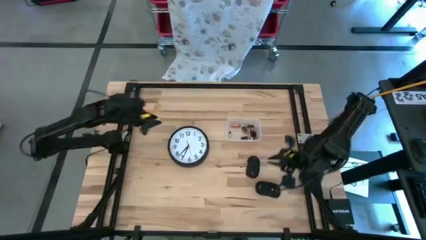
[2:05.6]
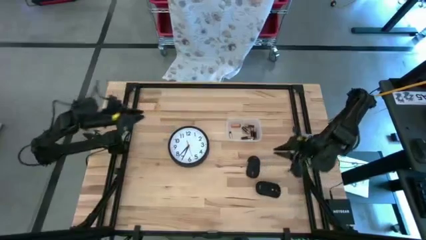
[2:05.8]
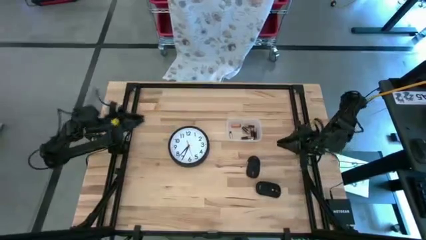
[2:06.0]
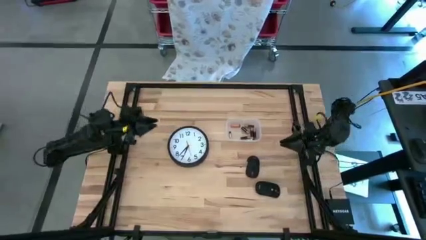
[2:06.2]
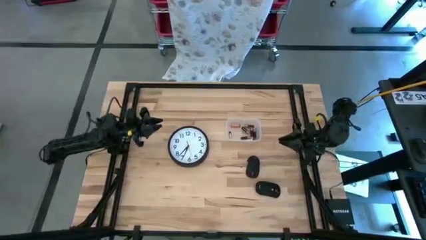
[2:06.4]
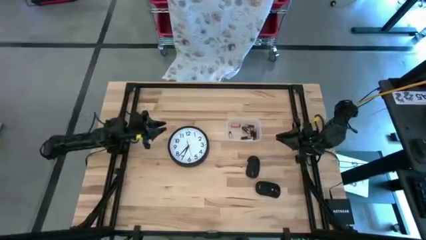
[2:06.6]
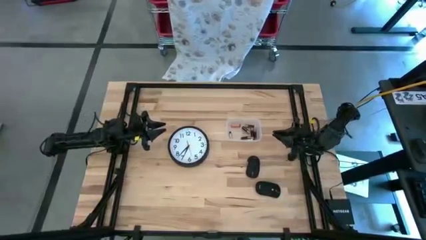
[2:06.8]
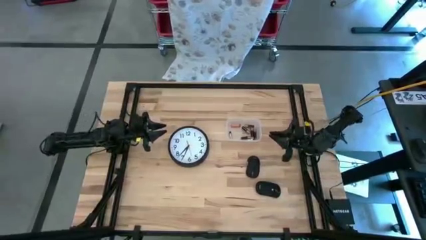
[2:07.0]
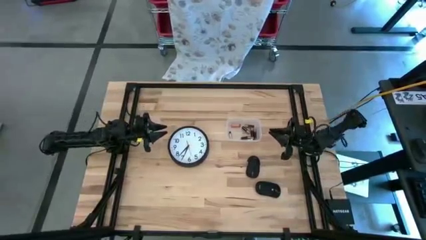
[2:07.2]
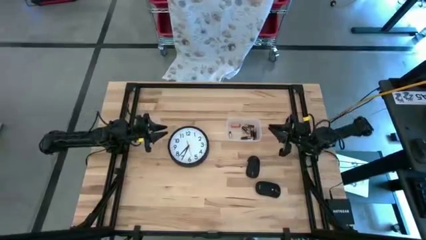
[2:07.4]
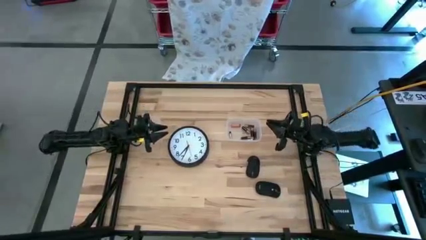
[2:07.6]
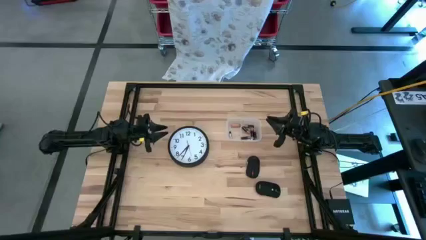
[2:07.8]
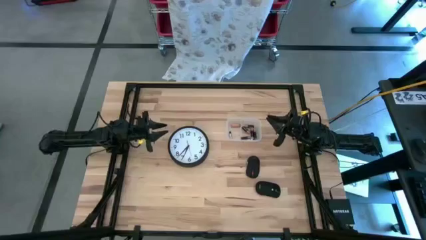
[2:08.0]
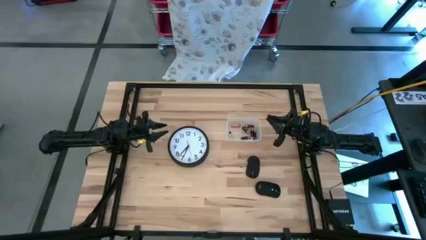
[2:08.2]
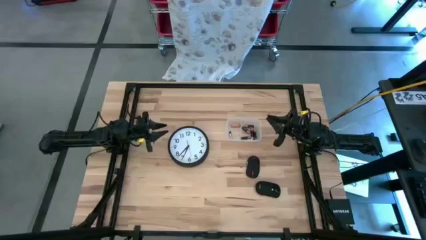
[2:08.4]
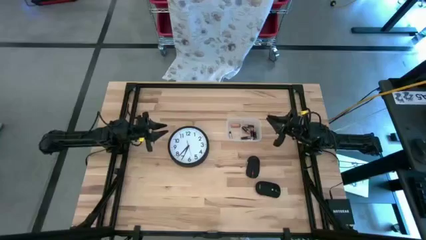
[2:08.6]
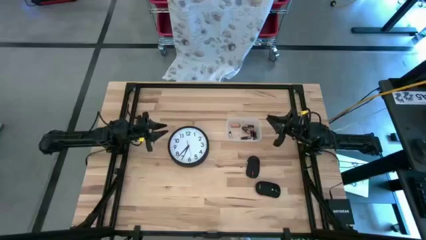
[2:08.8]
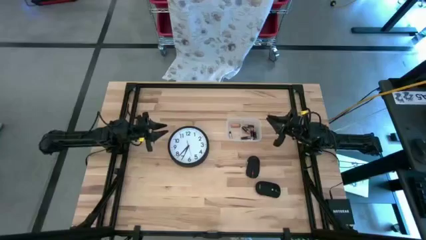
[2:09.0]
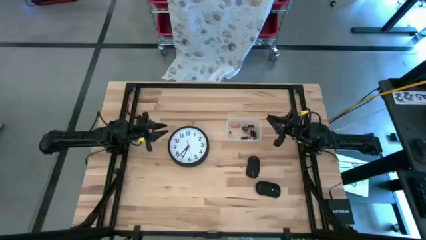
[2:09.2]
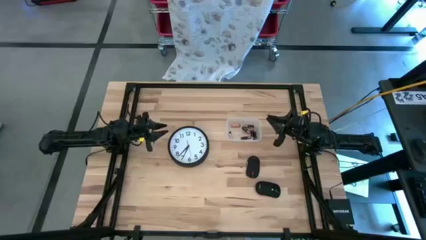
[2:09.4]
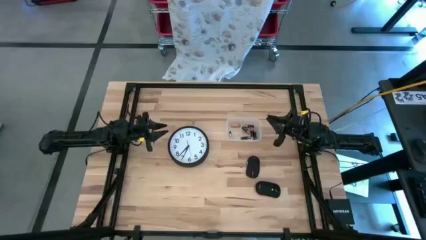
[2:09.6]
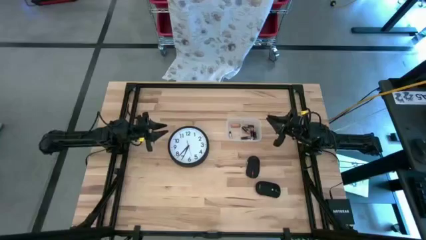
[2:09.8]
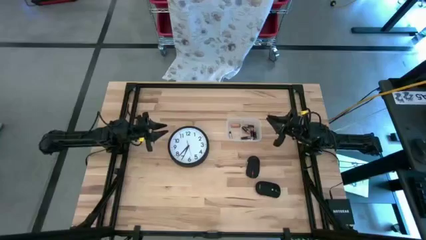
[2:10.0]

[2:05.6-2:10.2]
Task: Insert battery
Return to Home Position

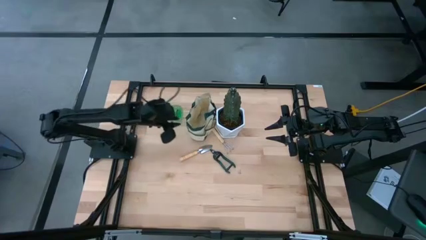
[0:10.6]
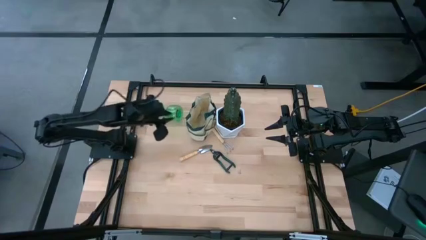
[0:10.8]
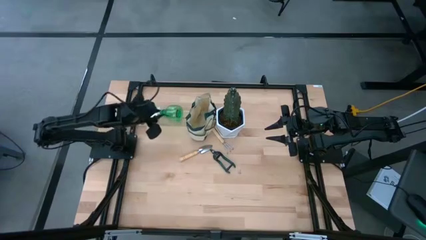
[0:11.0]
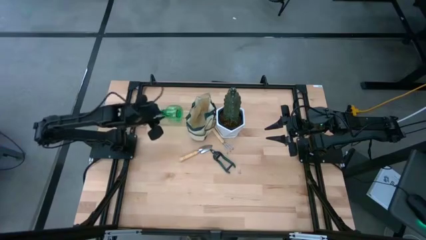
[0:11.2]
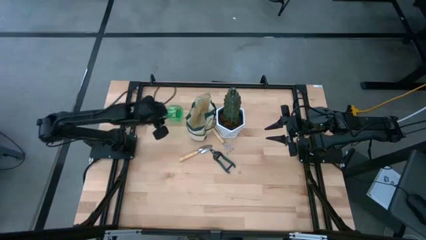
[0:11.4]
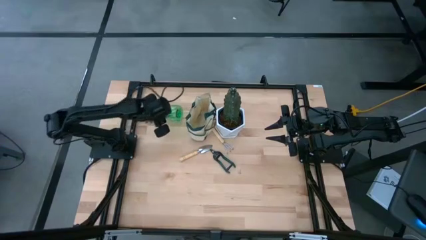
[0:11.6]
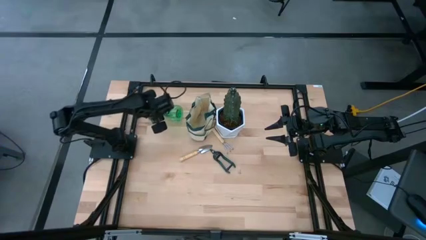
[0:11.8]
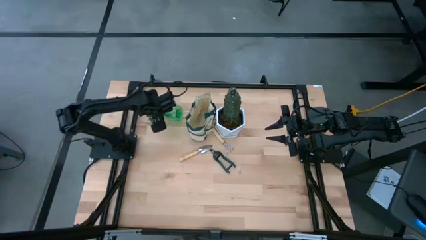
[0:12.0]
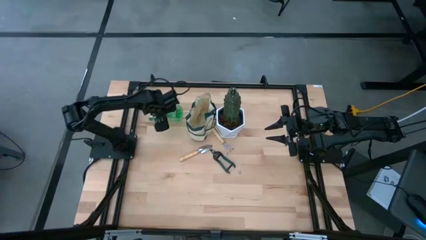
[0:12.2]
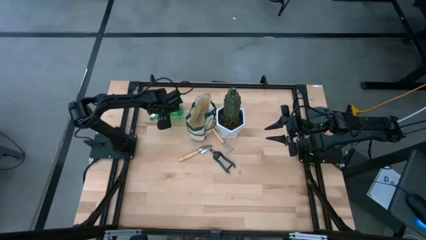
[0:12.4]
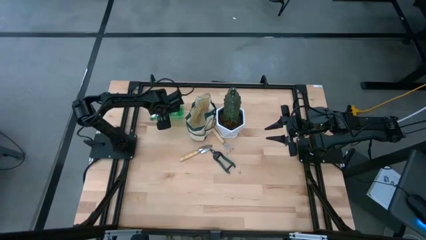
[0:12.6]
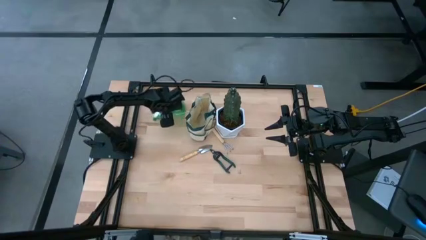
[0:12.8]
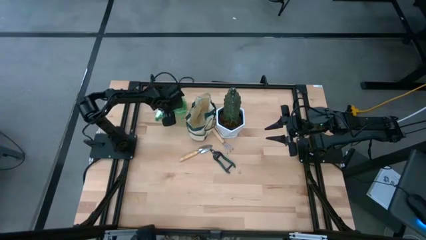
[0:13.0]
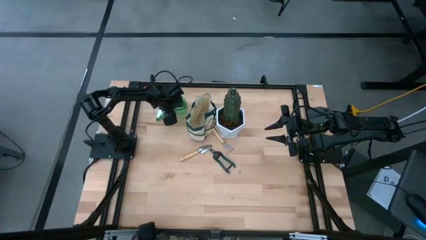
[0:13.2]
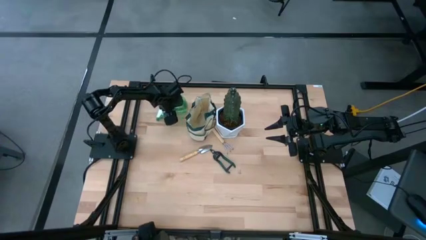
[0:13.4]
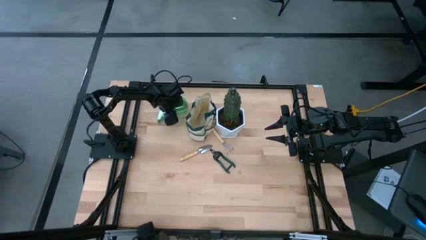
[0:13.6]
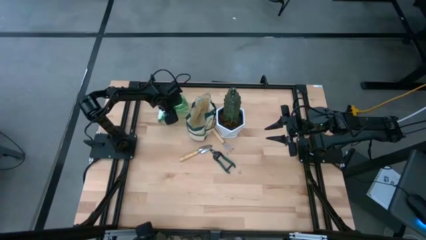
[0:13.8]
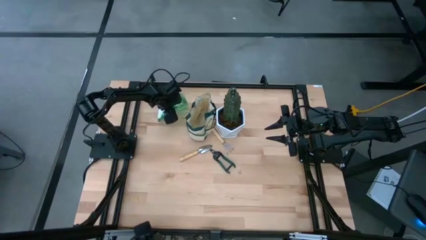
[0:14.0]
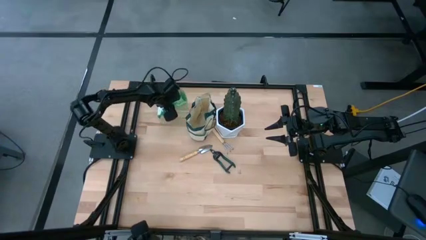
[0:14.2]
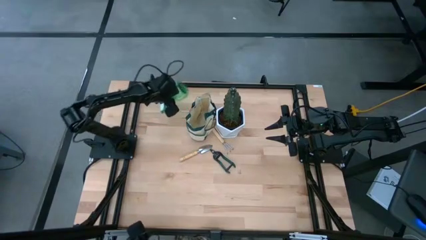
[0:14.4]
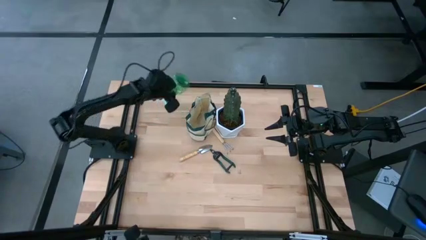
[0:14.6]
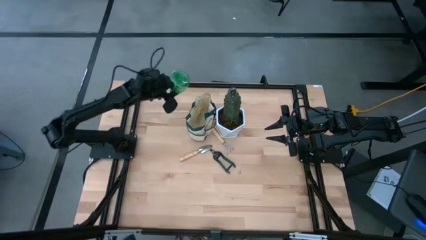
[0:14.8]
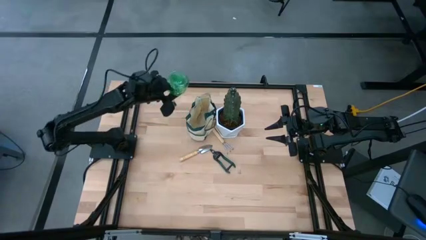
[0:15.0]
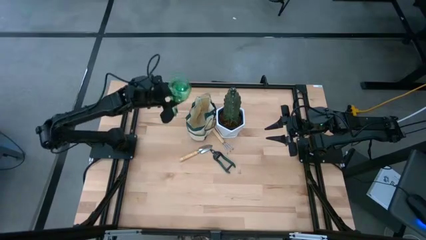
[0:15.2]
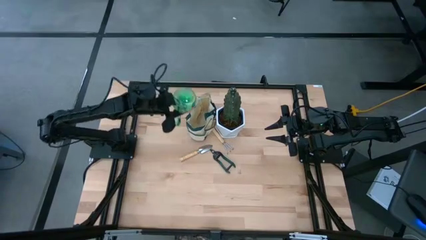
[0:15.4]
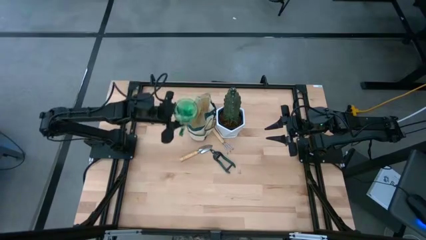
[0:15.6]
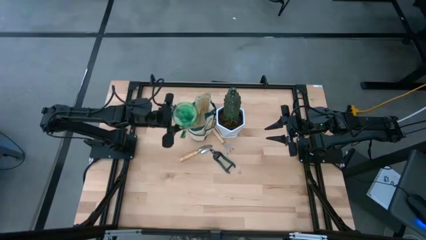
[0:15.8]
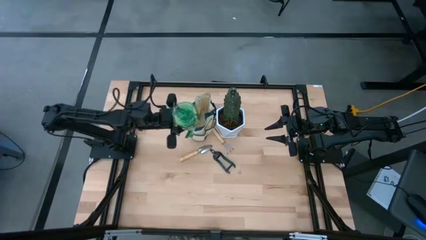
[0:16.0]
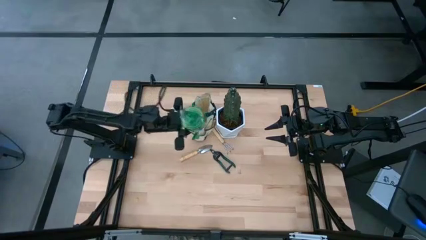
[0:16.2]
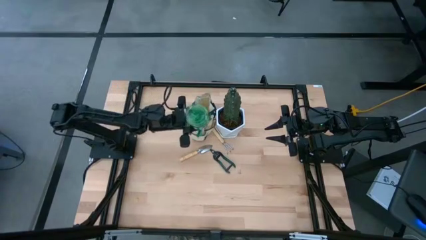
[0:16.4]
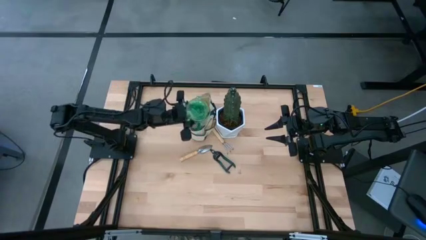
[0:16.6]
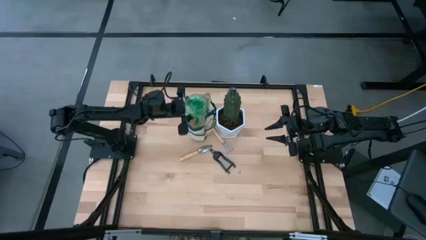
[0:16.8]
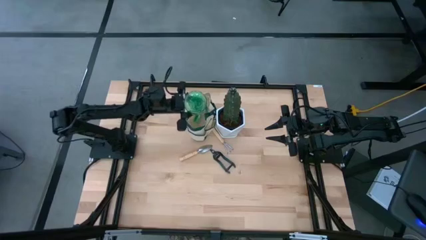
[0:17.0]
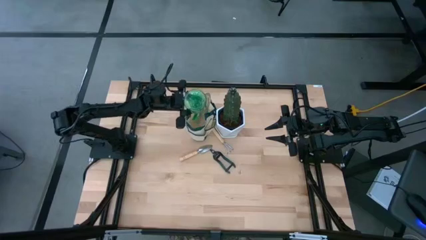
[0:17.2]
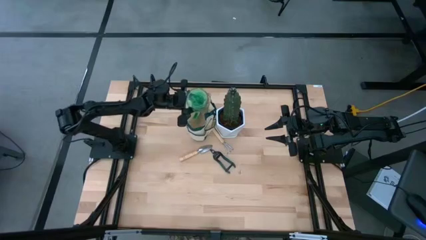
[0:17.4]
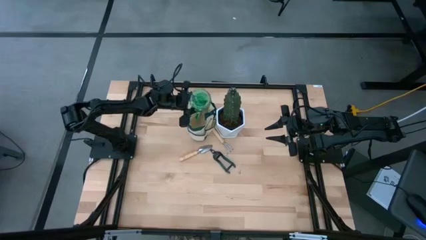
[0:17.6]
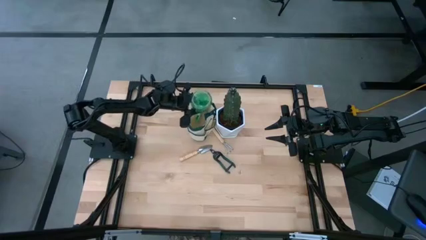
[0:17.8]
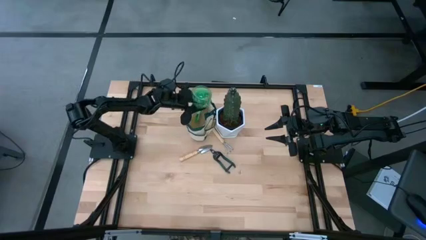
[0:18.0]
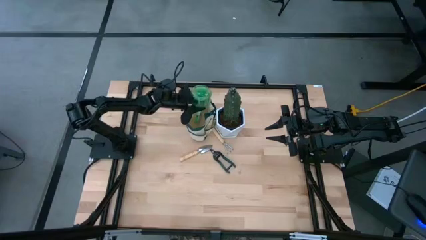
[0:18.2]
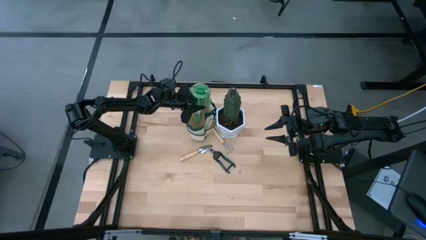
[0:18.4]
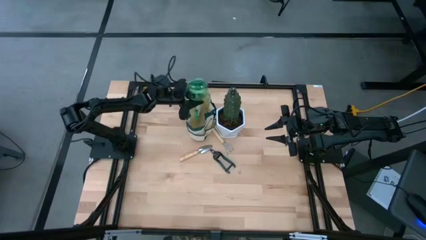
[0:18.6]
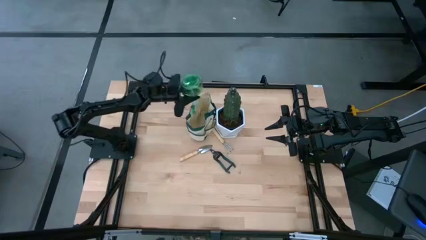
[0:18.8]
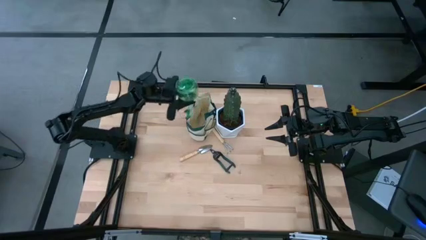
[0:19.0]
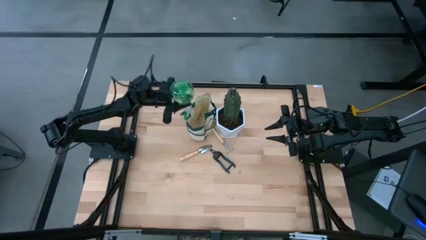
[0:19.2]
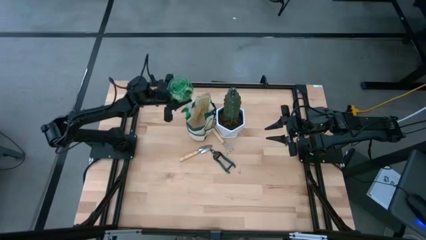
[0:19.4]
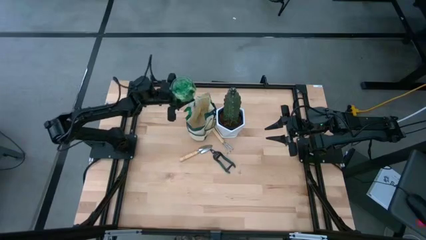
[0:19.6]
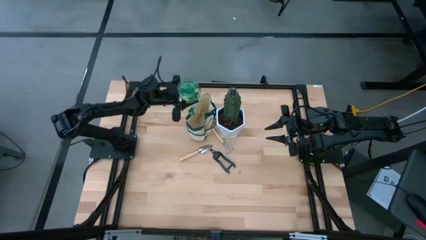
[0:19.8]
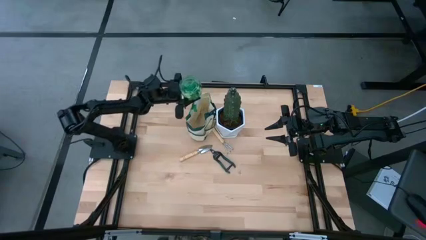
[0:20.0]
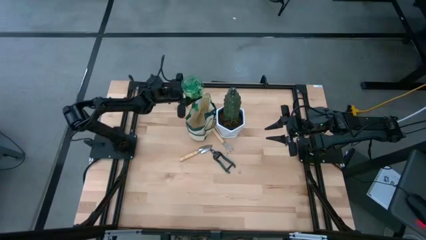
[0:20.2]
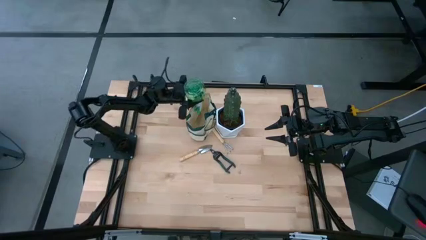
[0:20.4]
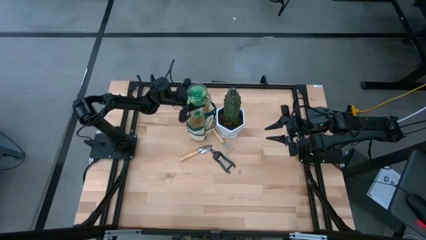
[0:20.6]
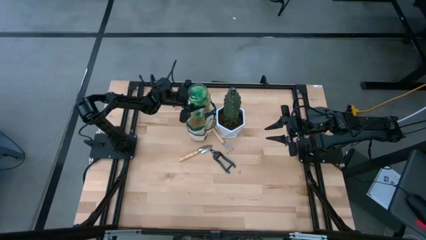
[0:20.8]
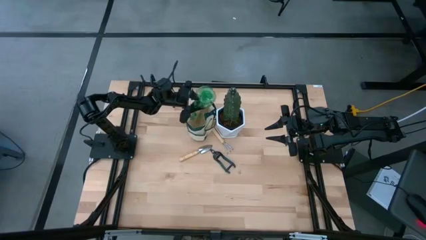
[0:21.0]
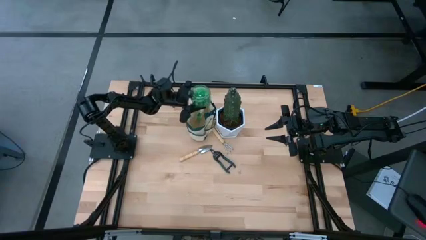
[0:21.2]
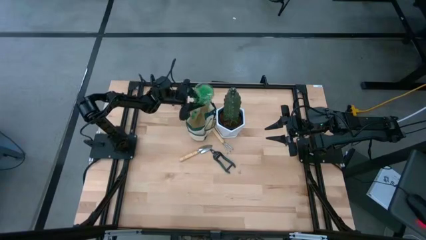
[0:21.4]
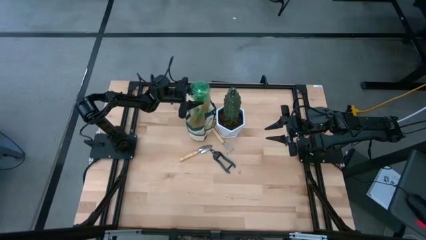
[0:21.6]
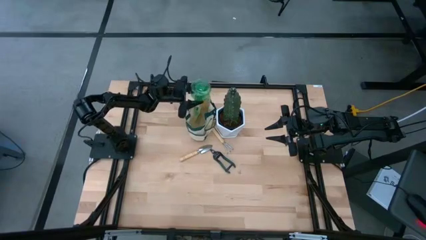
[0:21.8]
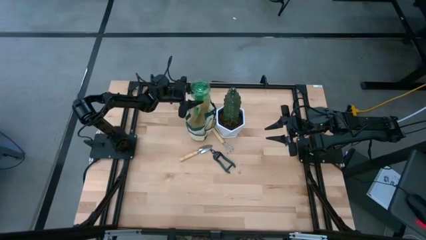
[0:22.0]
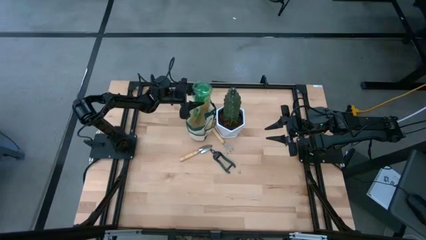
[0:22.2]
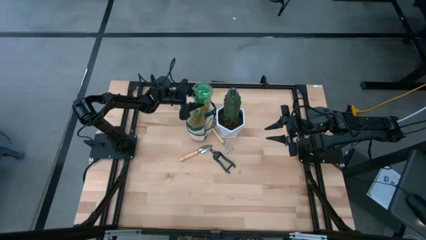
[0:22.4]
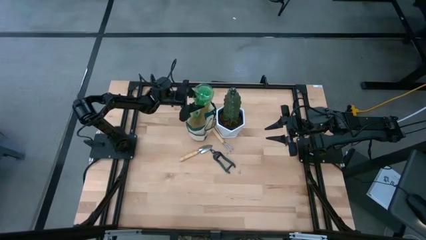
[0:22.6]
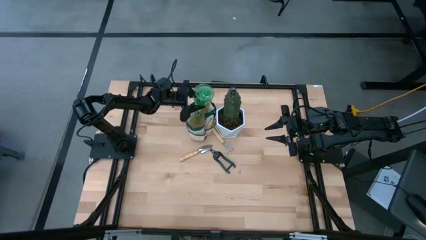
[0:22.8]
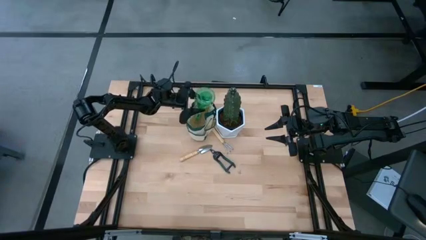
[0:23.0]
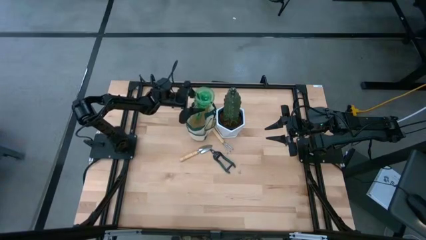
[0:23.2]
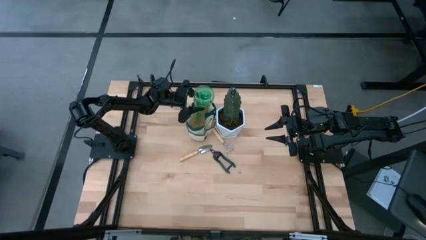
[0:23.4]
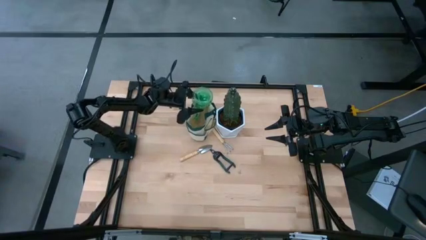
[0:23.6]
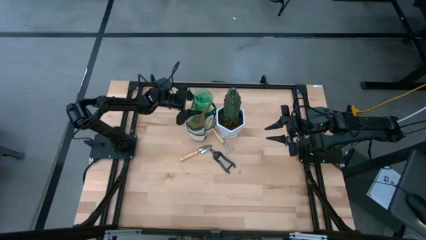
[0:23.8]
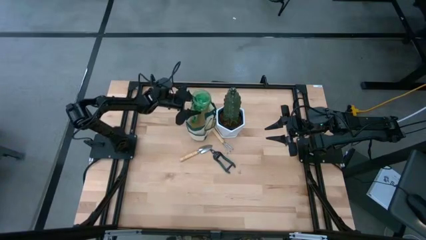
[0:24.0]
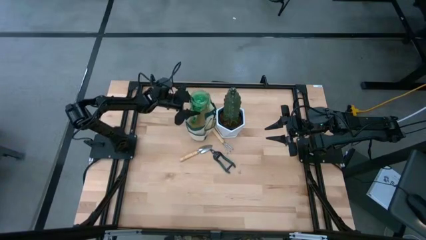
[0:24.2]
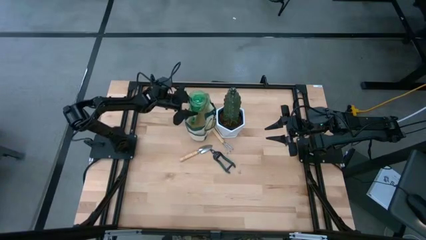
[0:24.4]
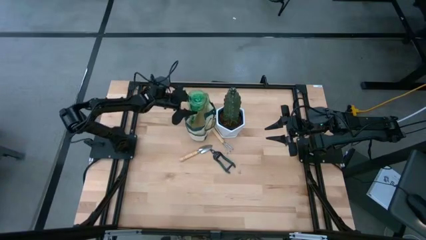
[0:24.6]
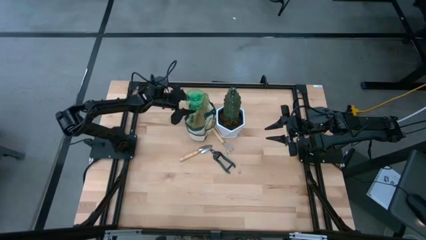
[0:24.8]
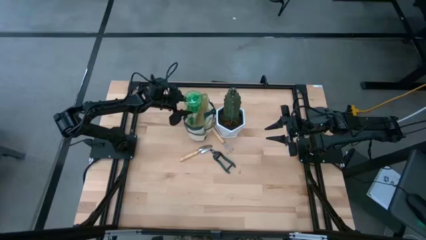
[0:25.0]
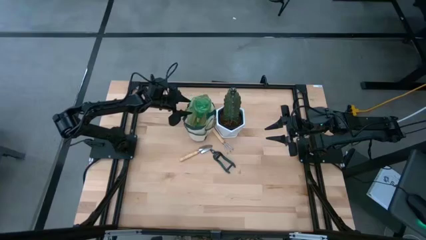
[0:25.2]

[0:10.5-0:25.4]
Task: Pick & Place Garden tools in Gardening bag
Put the green spray bottle into the gardening bag
